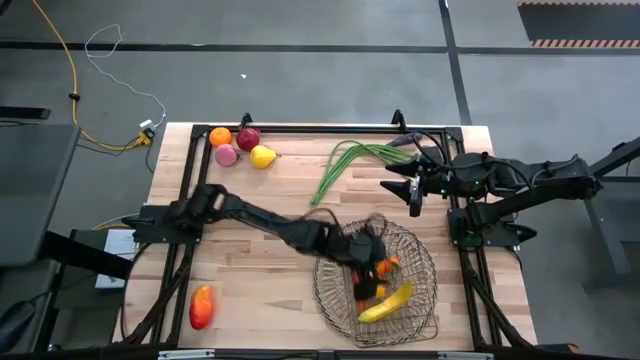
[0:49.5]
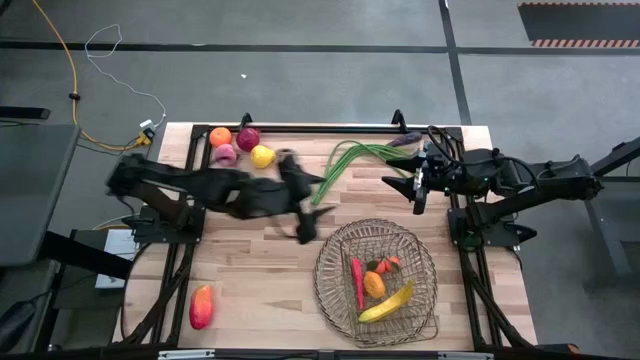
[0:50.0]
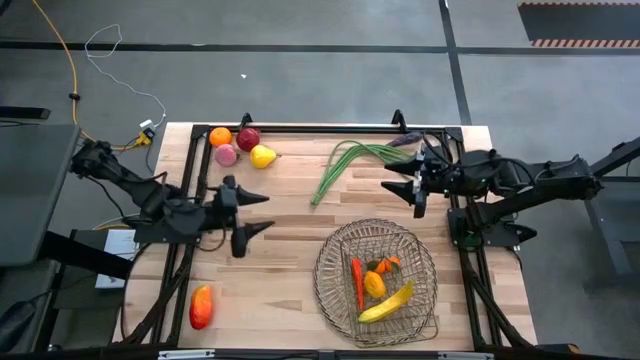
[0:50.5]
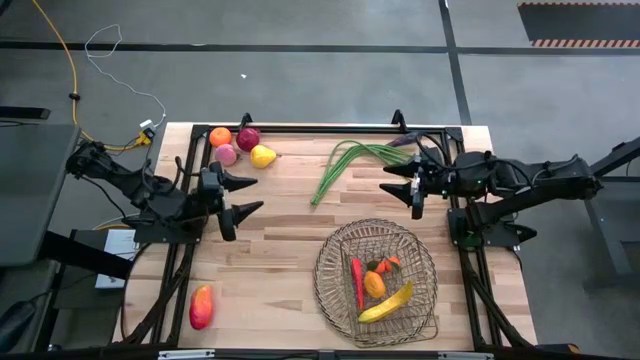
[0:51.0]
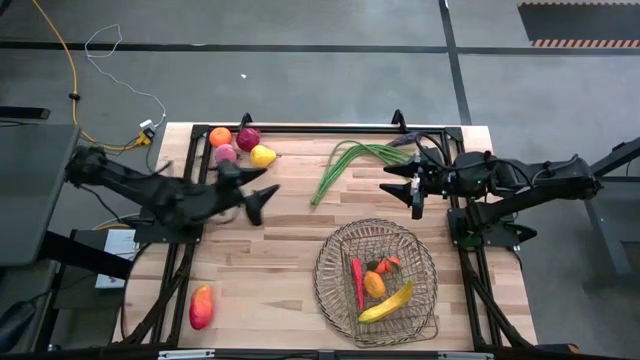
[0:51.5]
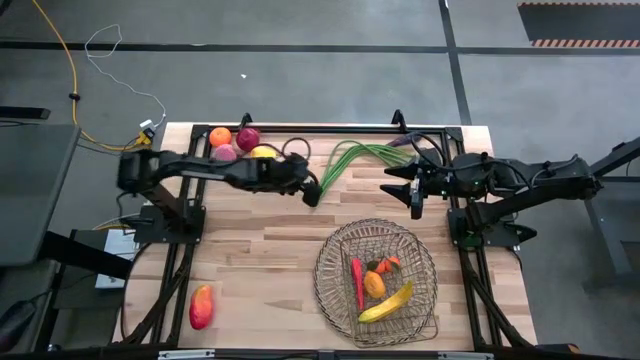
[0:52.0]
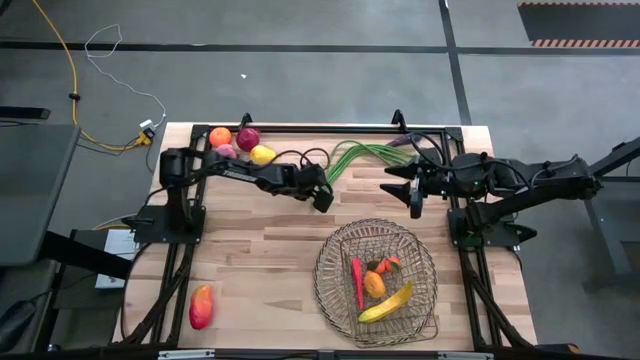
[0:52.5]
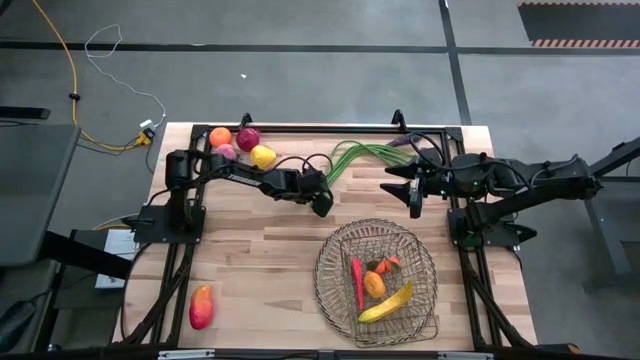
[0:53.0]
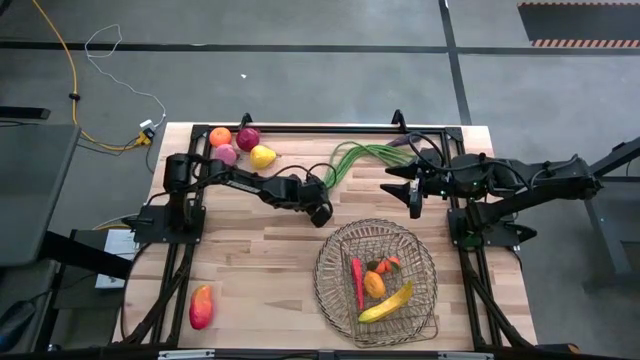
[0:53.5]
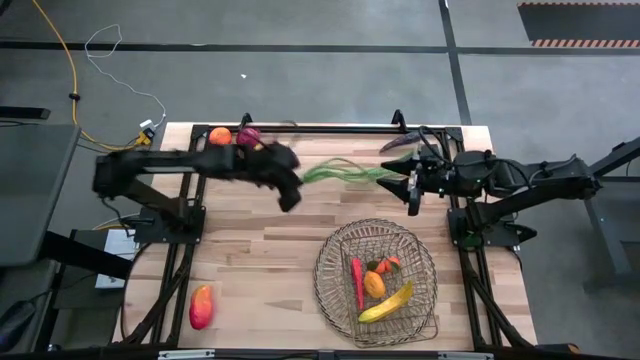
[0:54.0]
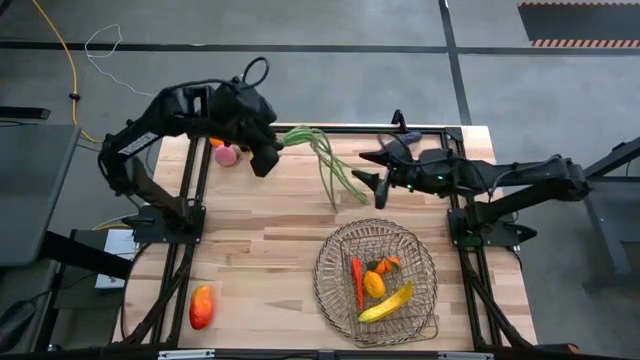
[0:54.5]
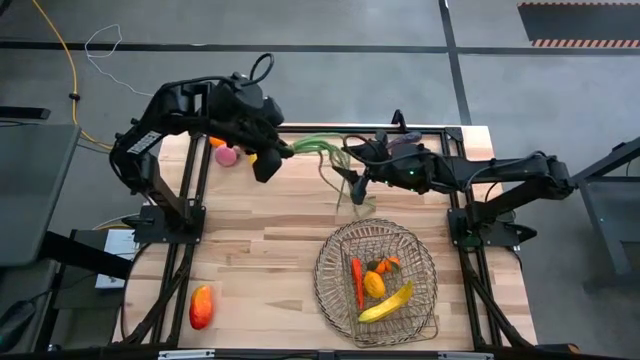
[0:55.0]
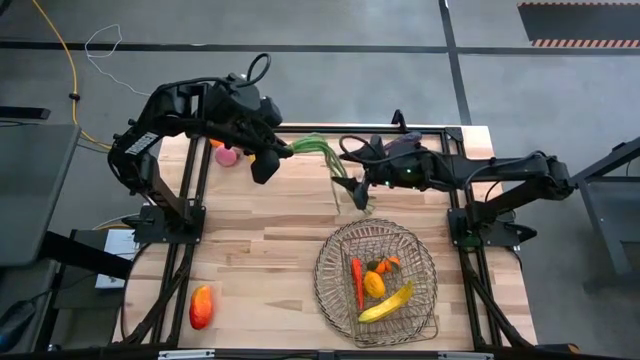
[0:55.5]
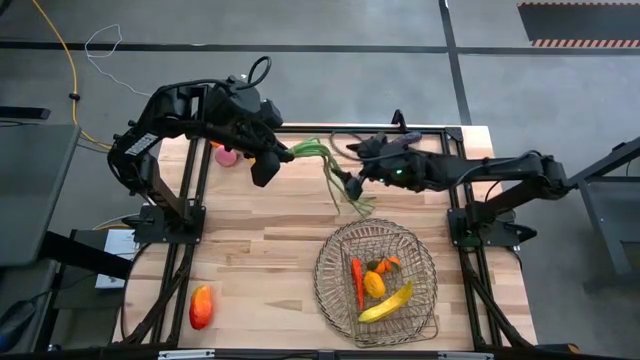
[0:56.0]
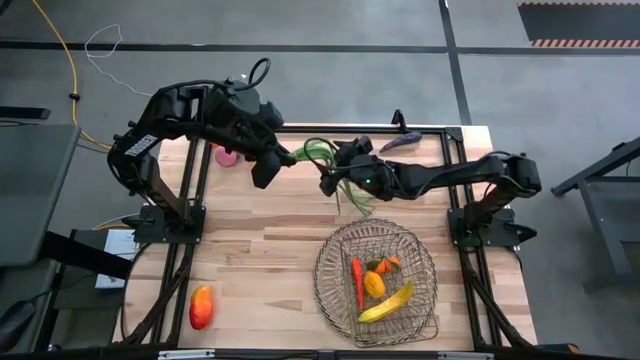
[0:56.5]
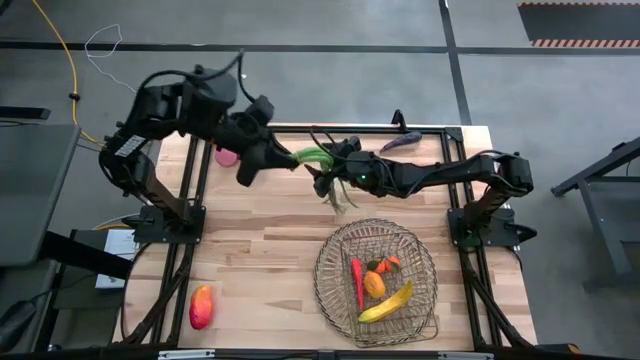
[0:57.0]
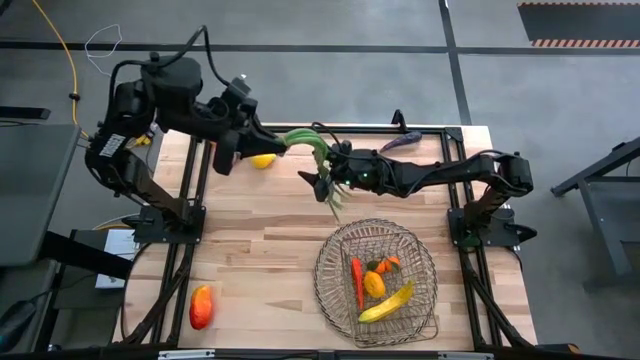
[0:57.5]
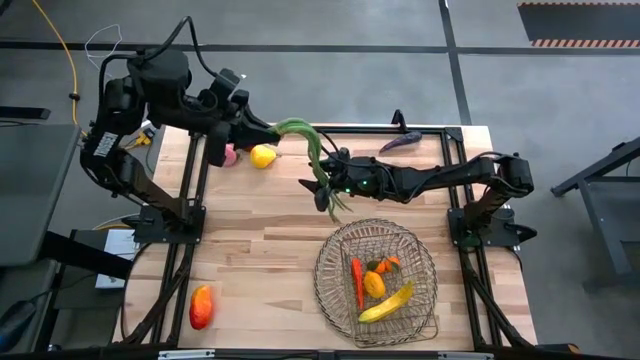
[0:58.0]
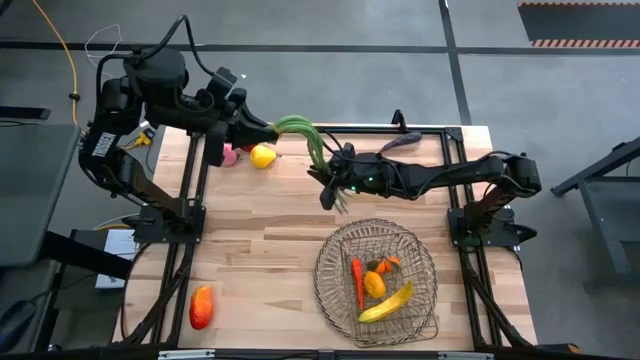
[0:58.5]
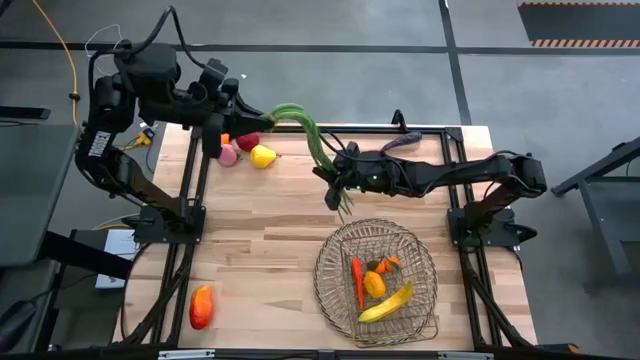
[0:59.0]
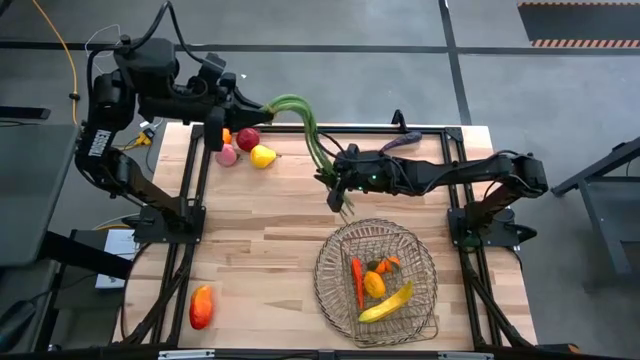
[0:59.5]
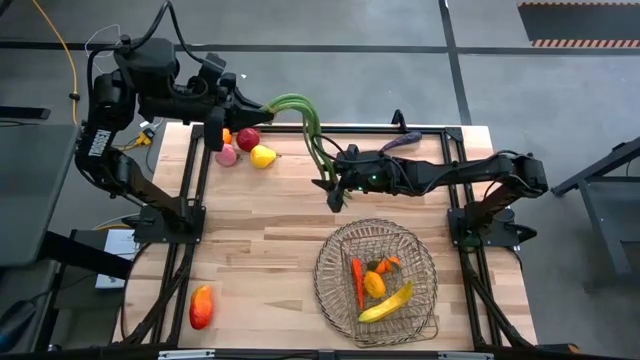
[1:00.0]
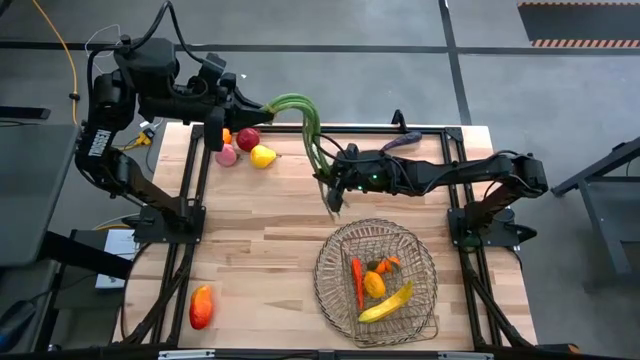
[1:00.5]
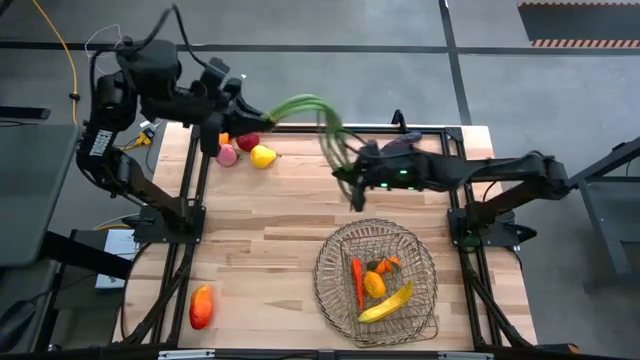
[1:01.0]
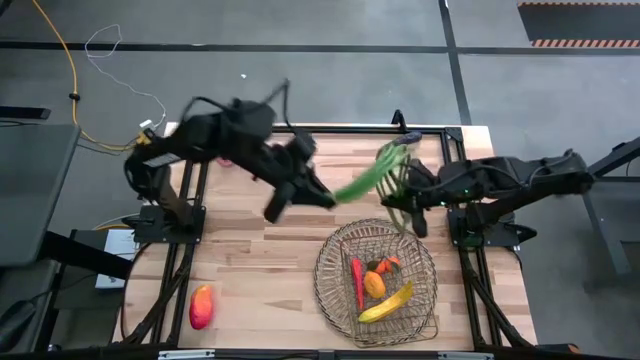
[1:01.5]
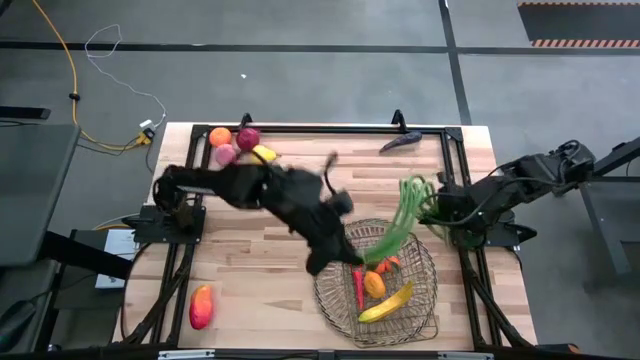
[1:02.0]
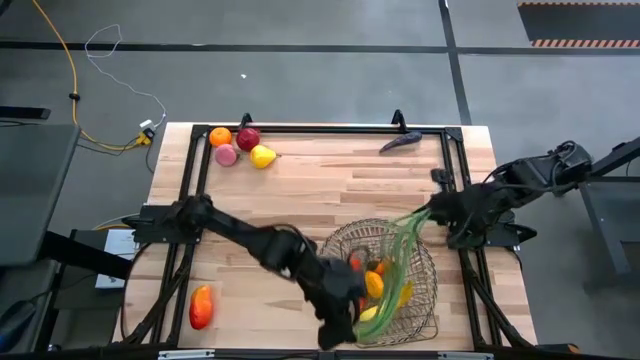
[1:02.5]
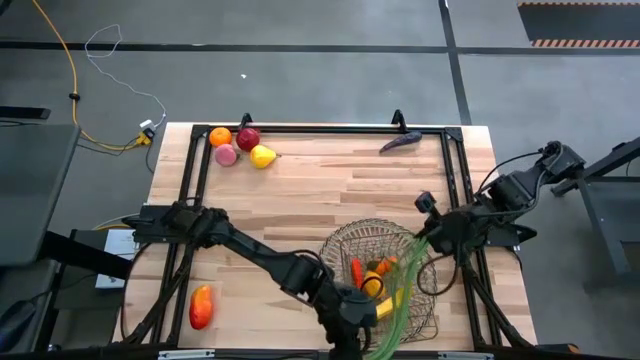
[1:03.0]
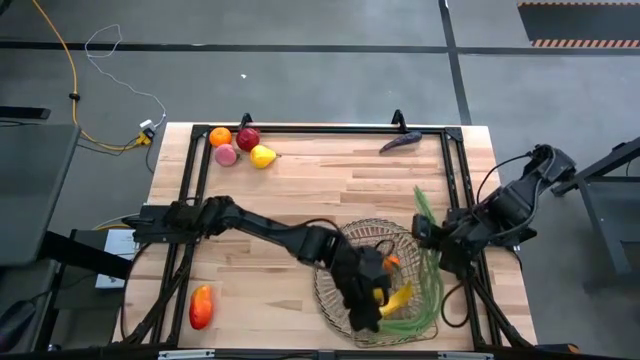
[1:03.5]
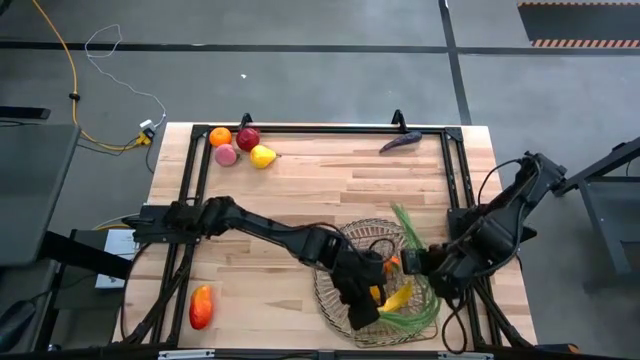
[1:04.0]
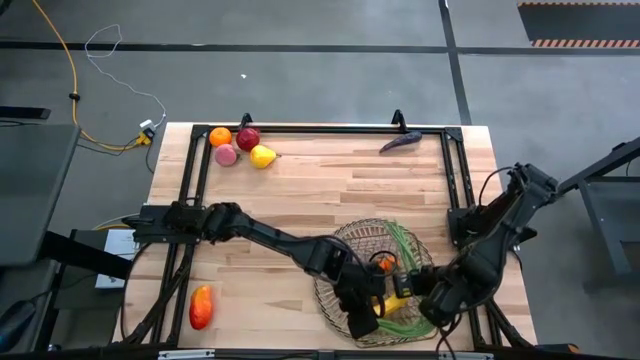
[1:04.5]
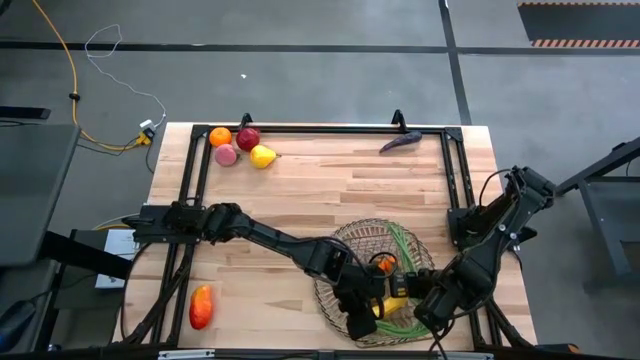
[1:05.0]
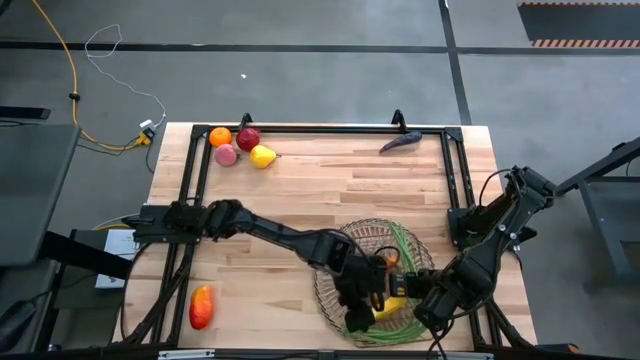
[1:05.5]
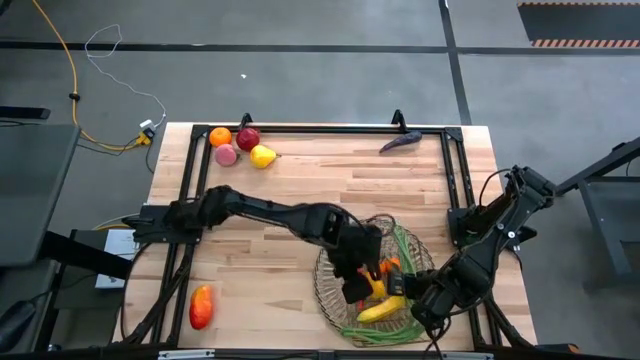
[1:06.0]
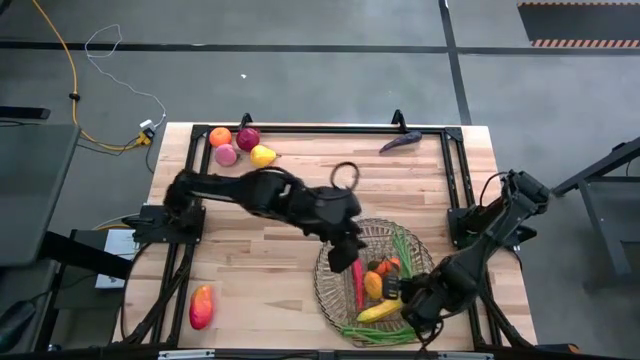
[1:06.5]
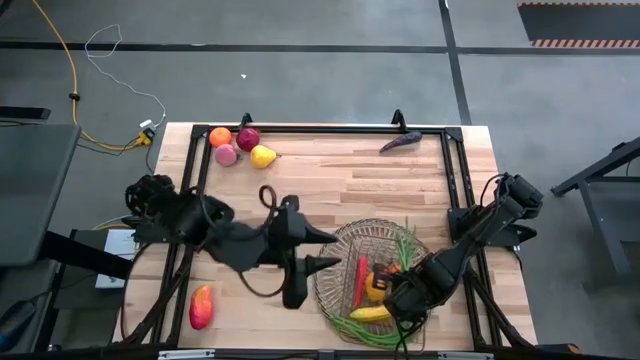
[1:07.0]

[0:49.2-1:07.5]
Task: Build produce basket
Put the beans into the wire basket

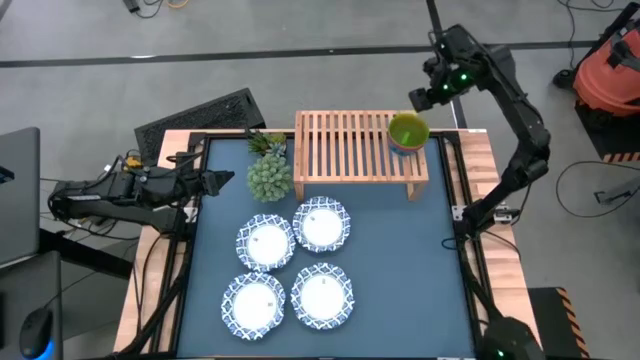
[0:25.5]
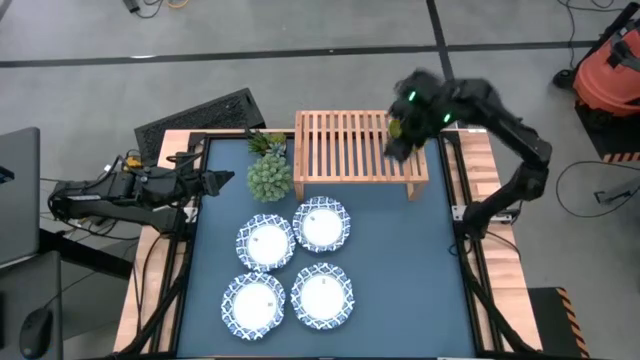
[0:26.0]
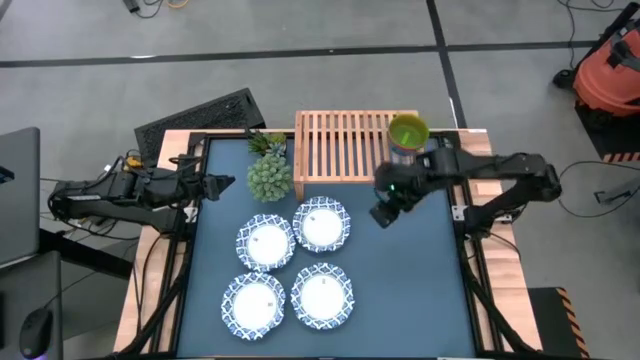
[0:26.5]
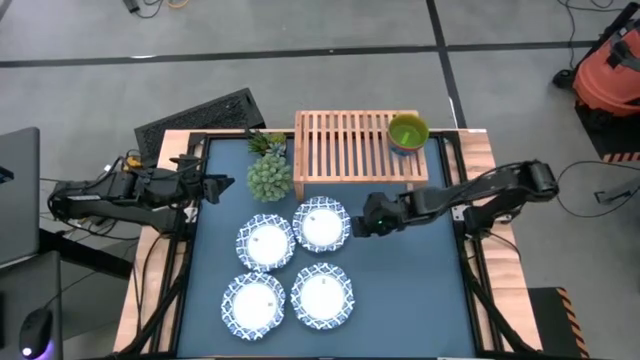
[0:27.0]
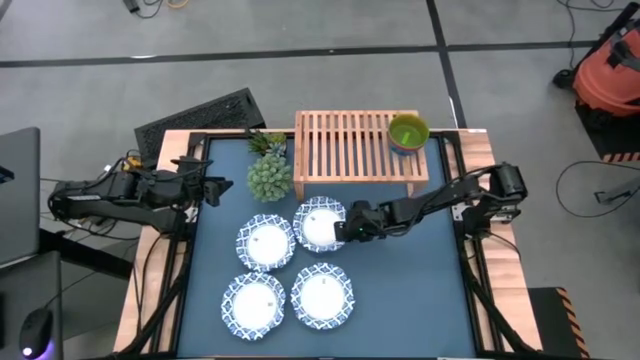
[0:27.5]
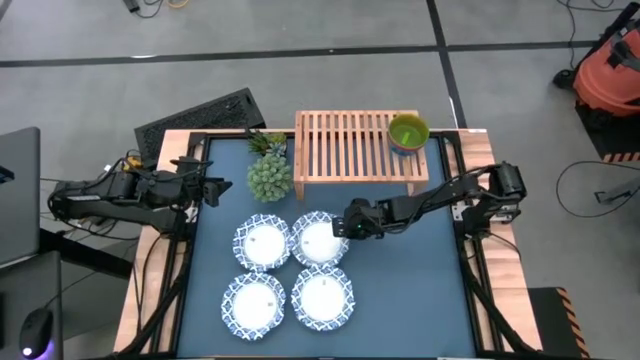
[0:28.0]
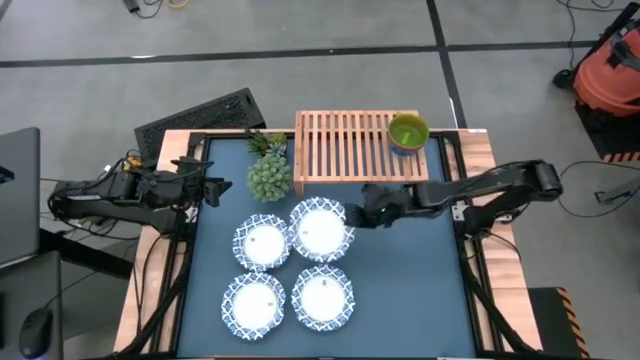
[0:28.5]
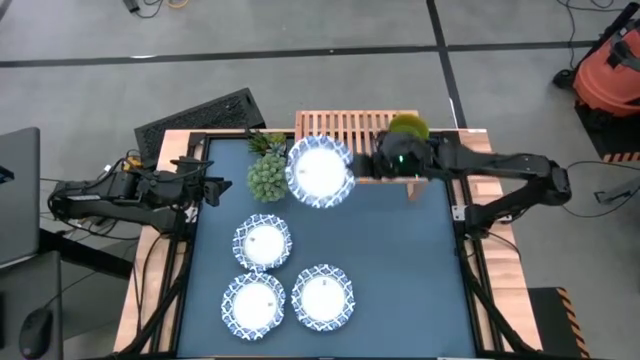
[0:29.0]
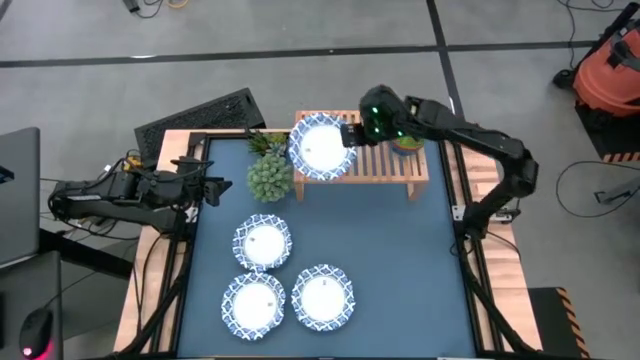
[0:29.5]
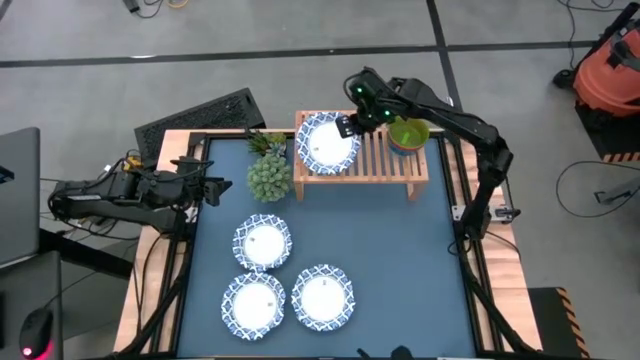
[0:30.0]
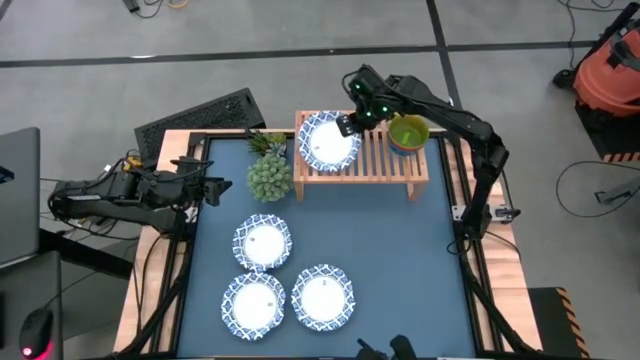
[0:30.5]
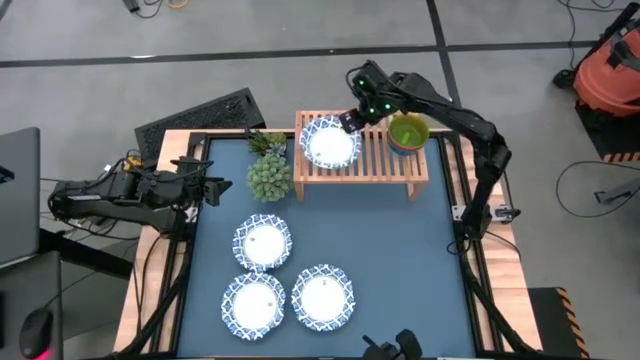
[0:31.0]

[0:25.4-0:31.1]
Task: Place and stack bowls onto a shelf
Put the white bowl on the shelf
